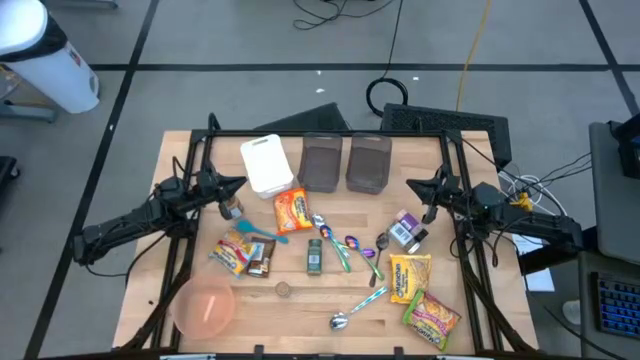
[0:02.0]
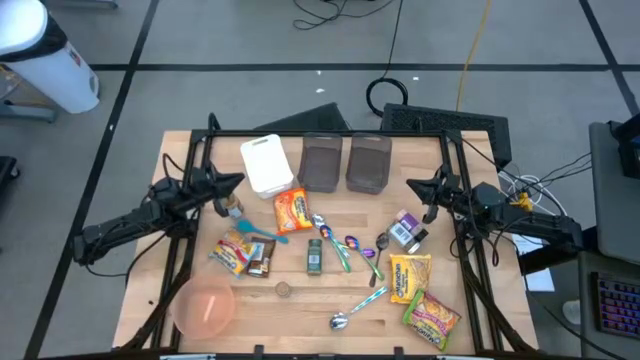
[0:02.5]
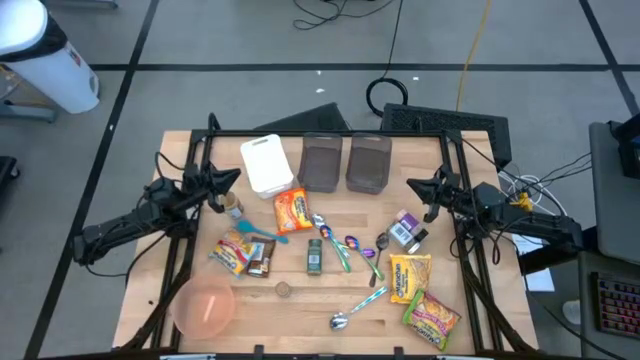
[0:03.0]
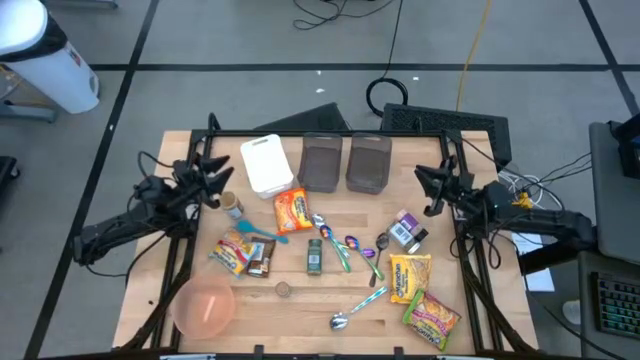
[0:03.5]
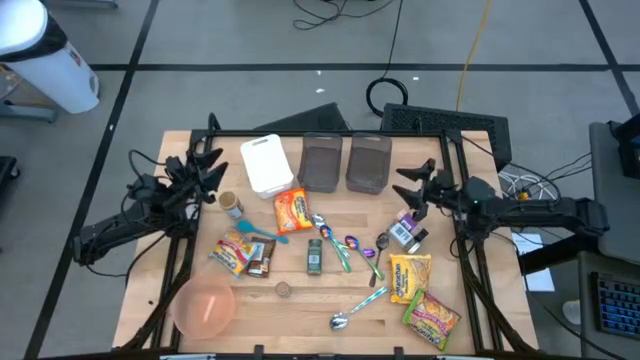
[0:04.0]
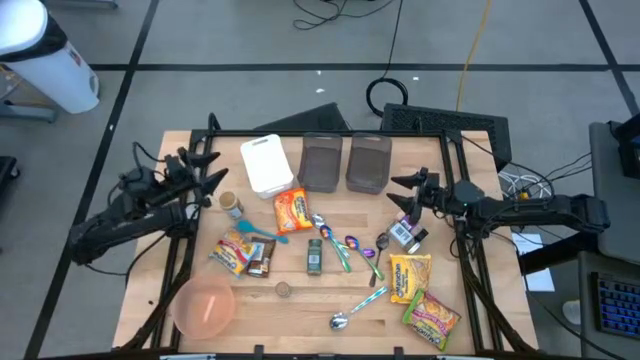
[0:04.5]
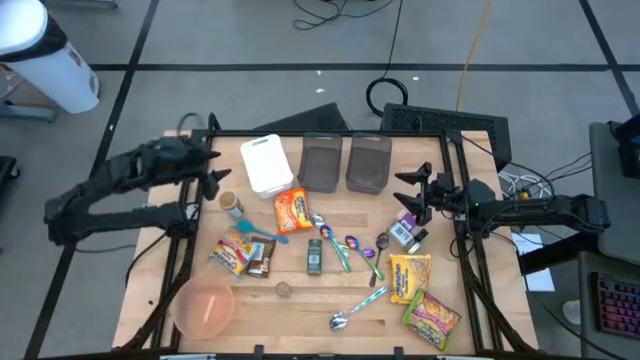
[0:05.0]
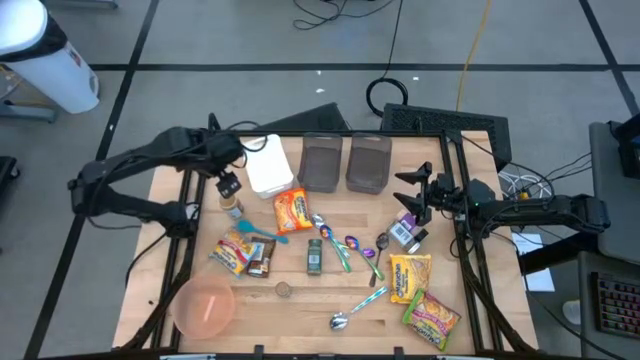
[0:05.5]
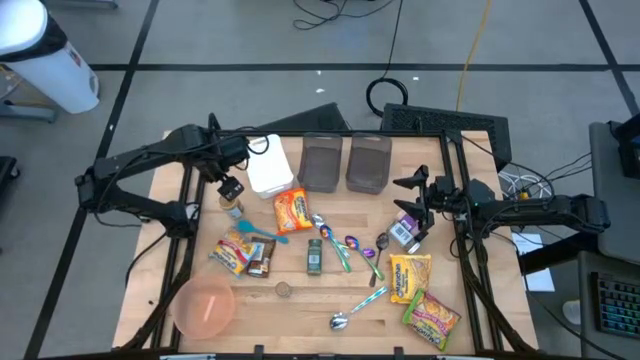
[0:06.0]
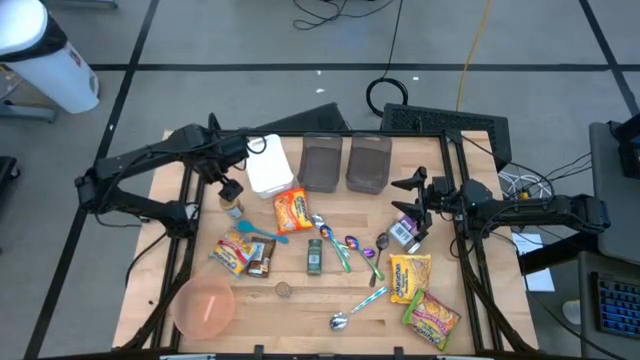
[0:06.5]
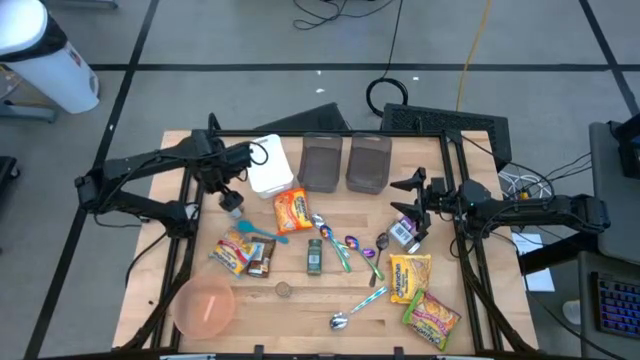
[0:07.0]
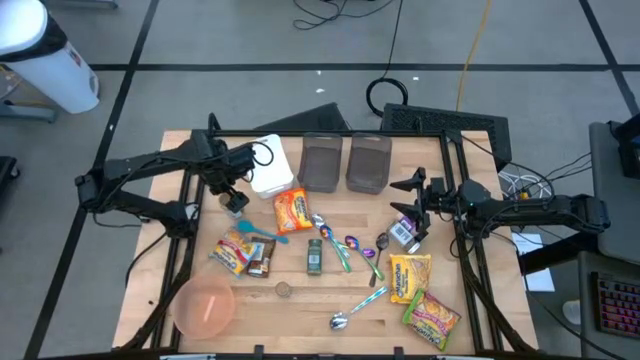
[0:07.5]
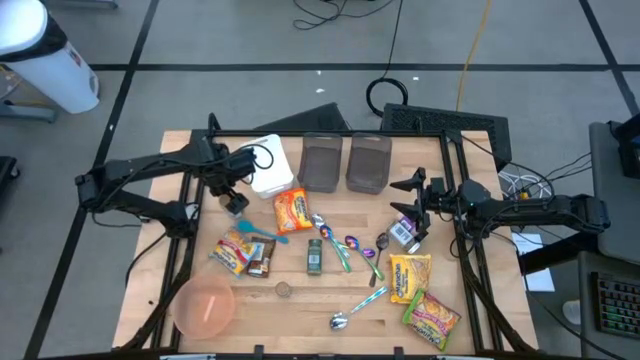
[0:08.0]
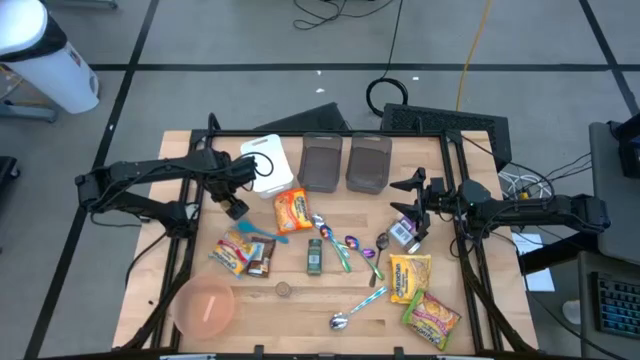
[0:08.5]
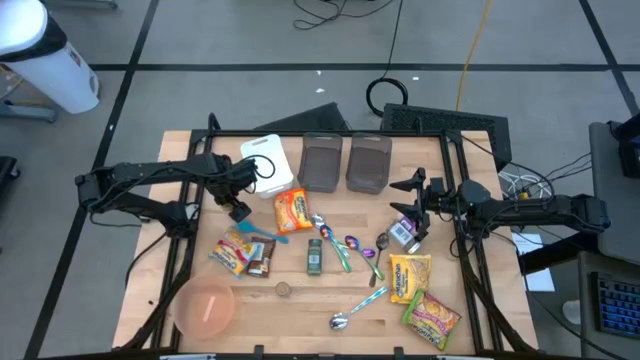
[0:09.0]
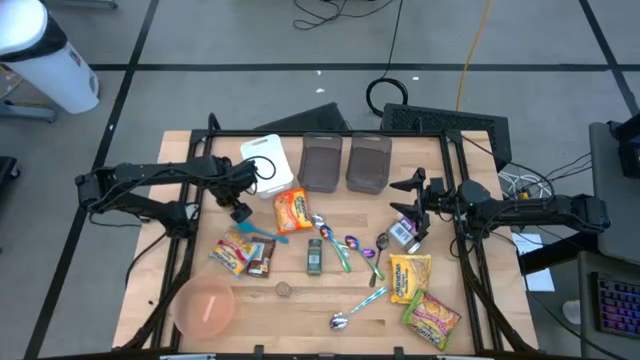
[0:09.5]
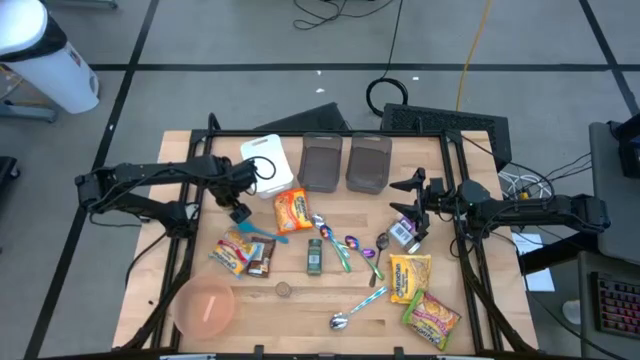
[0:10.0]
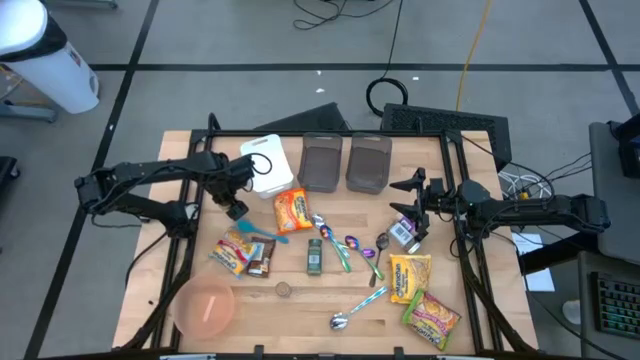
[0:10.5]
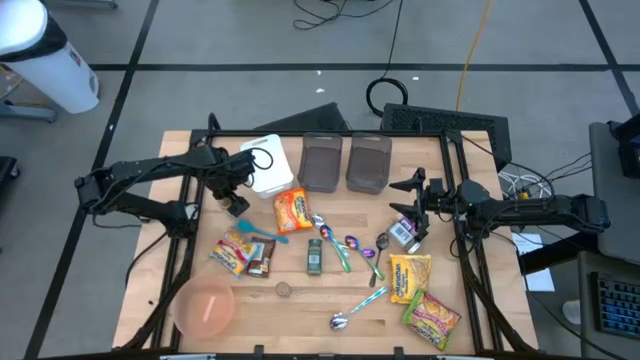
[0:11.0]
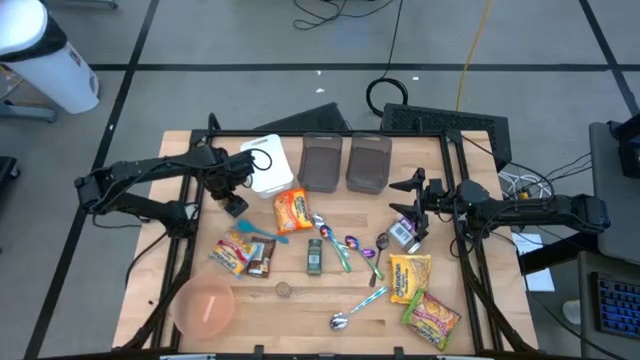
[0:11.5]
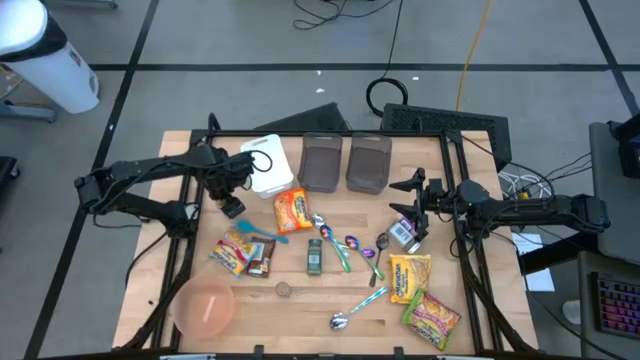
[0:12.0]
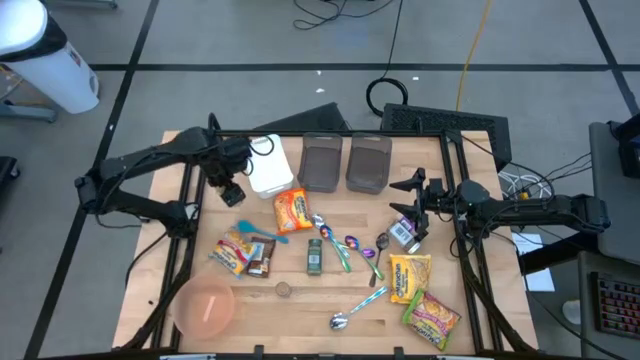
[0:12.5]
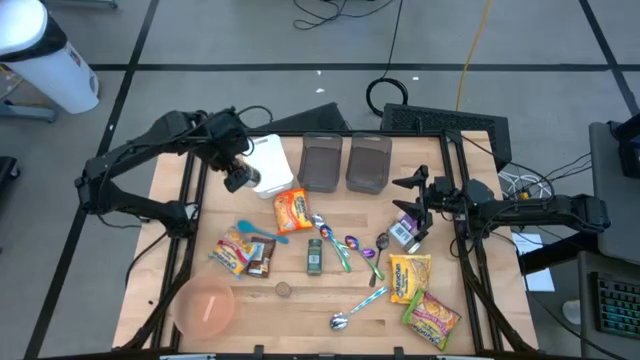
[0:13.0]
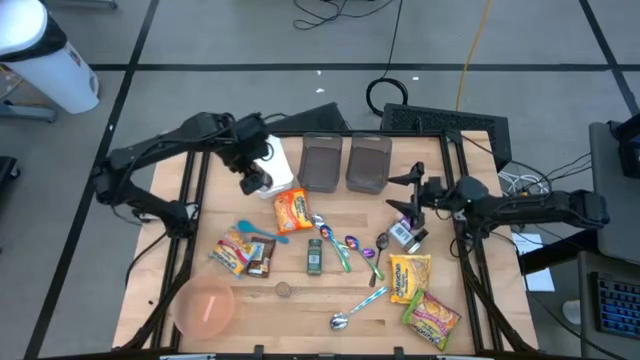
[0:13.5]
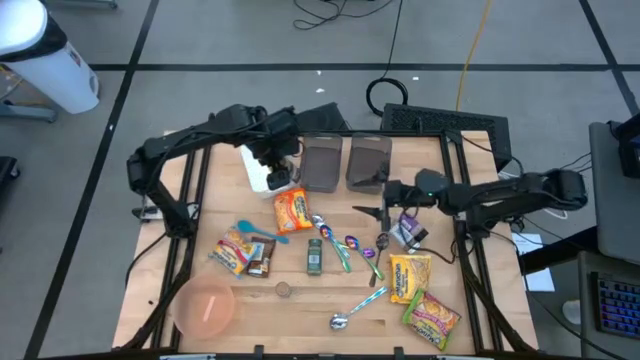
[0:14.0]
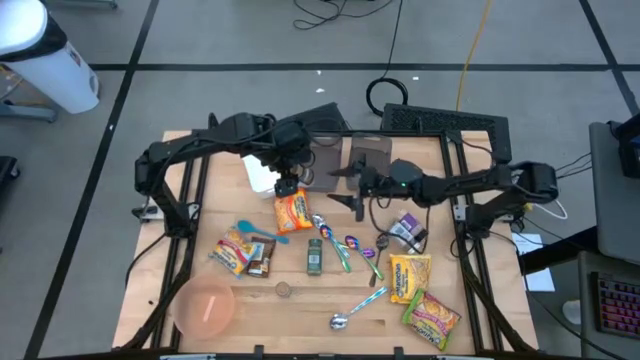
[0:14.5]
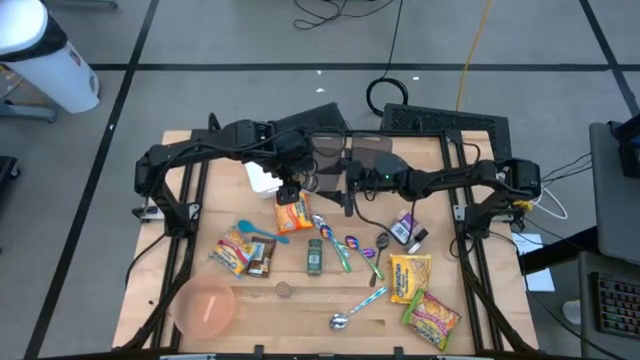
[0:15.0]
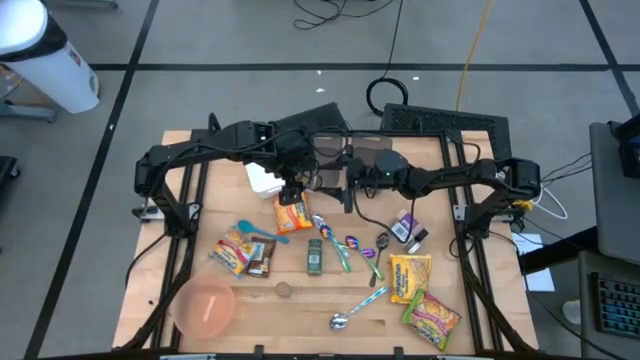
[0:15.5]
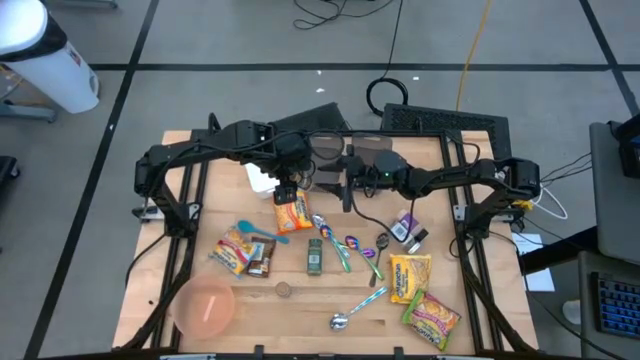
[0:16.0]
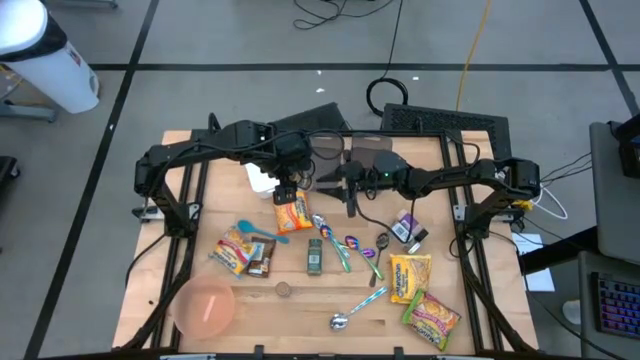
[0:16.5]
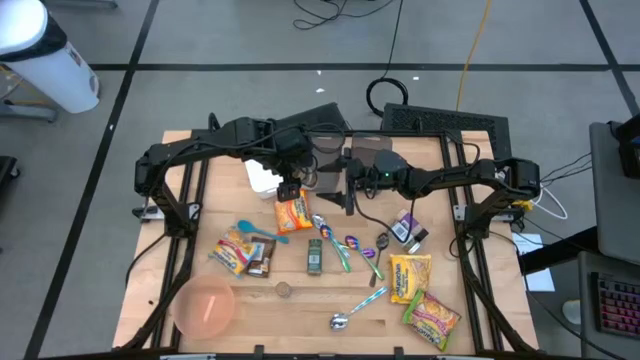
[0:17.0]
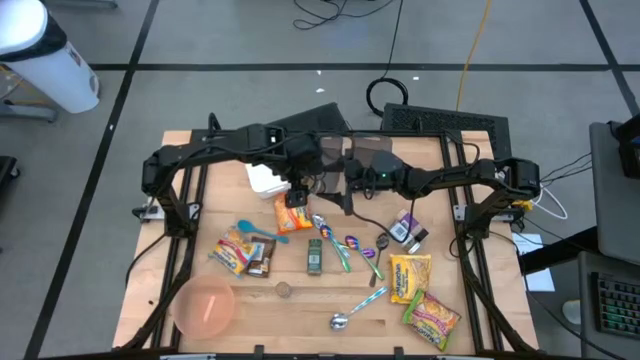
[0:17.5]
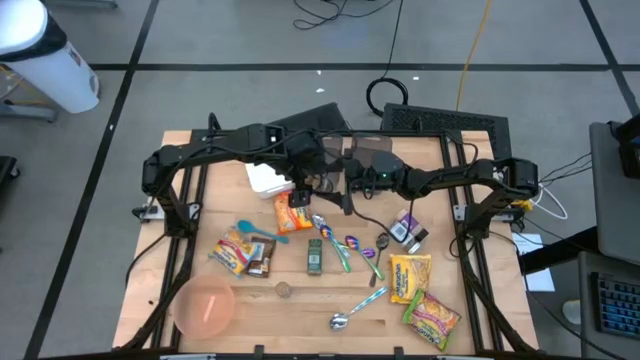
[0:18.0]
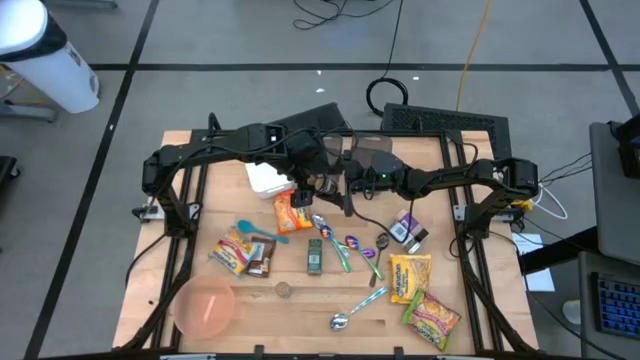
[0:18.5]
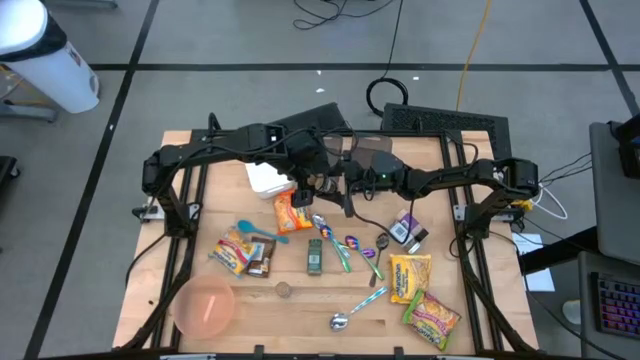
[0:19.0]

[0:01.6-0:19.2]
Task: Pick & Place Food Item
Put the gold seasoning bottle into the left black bin
